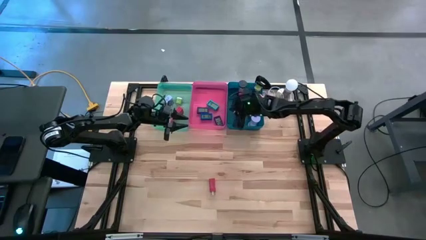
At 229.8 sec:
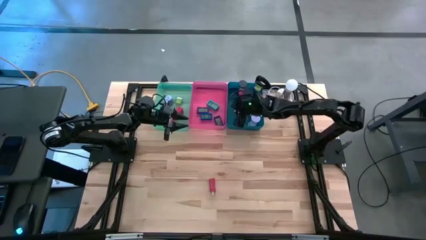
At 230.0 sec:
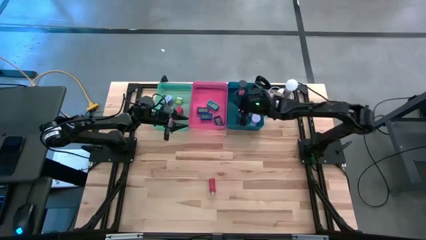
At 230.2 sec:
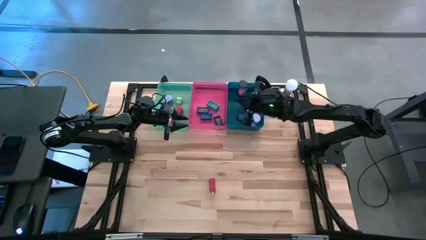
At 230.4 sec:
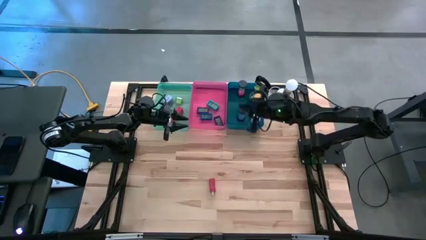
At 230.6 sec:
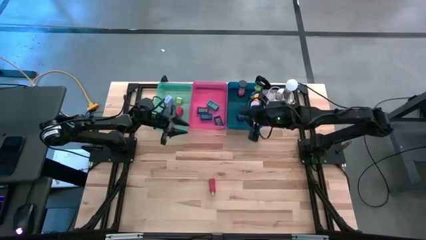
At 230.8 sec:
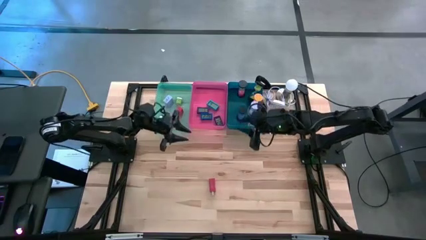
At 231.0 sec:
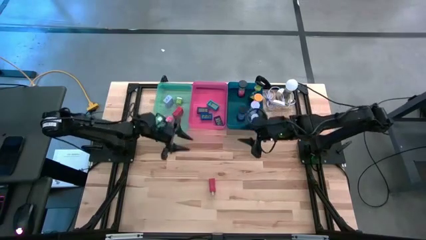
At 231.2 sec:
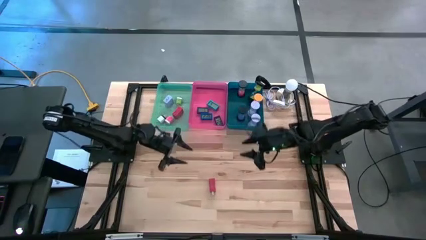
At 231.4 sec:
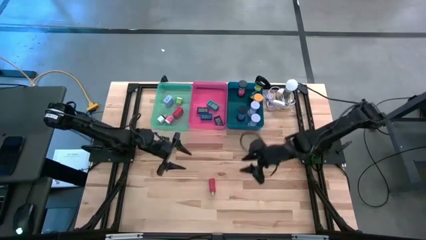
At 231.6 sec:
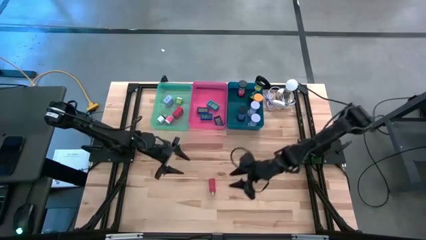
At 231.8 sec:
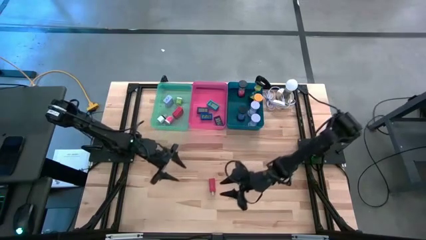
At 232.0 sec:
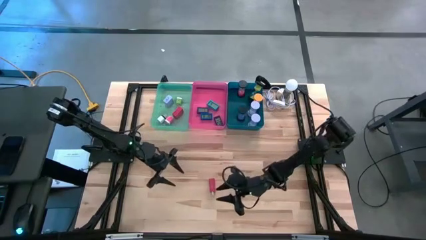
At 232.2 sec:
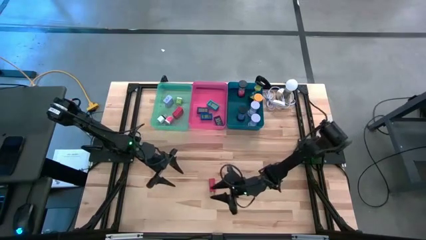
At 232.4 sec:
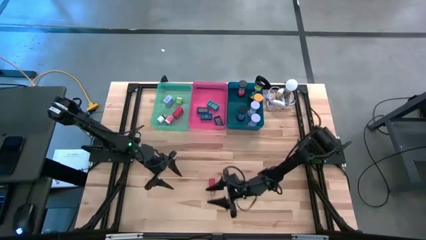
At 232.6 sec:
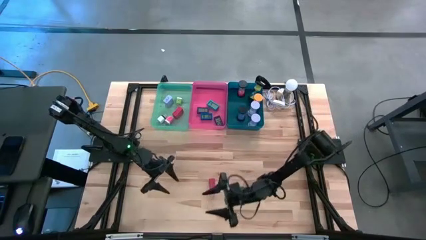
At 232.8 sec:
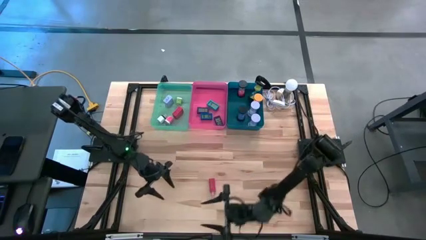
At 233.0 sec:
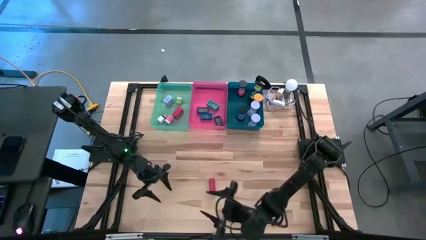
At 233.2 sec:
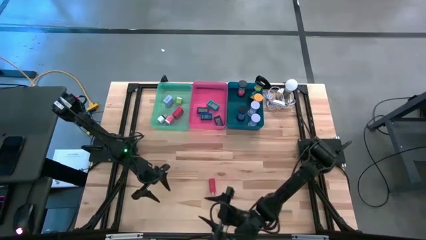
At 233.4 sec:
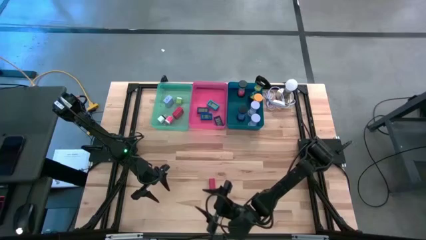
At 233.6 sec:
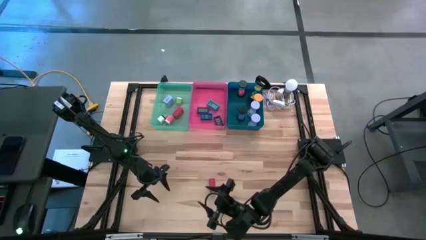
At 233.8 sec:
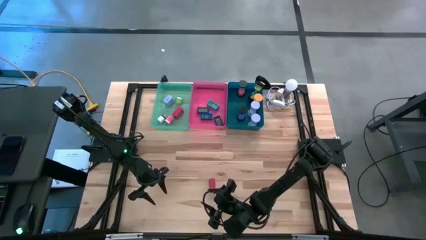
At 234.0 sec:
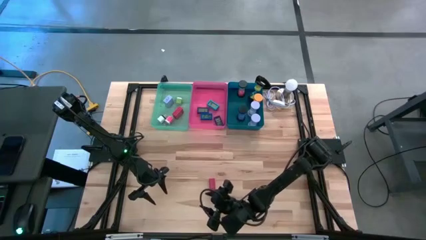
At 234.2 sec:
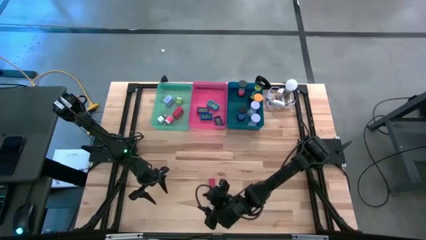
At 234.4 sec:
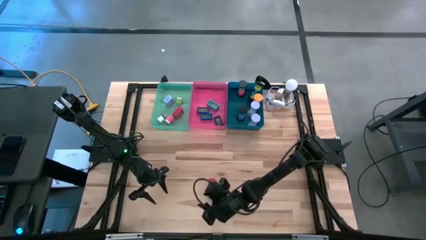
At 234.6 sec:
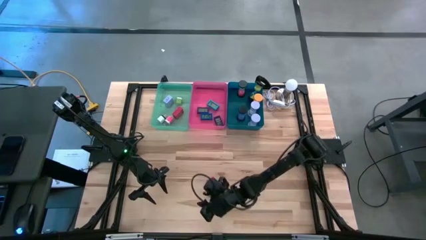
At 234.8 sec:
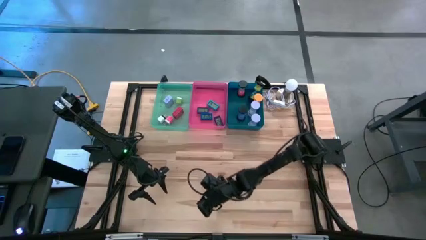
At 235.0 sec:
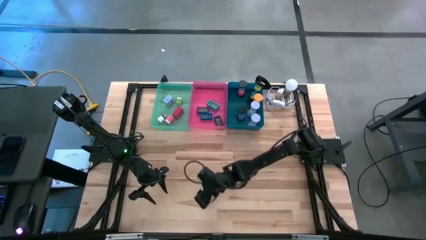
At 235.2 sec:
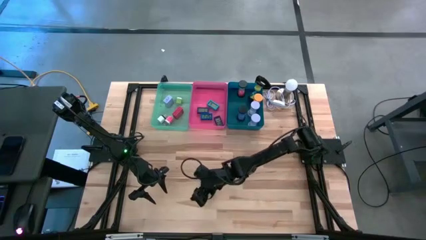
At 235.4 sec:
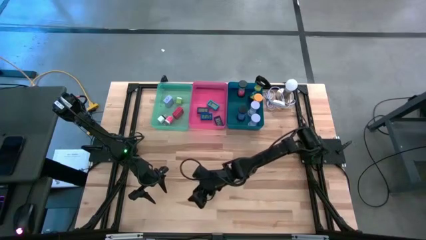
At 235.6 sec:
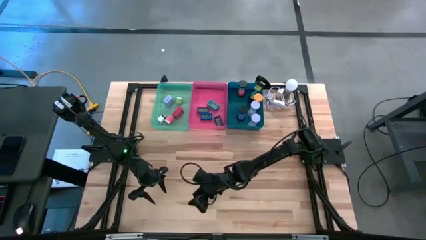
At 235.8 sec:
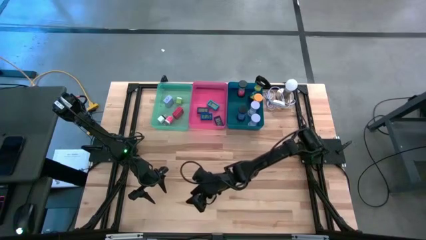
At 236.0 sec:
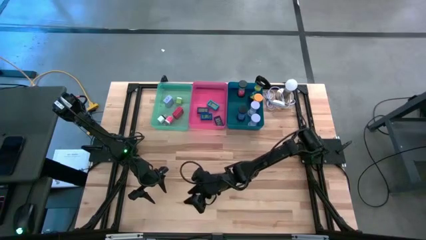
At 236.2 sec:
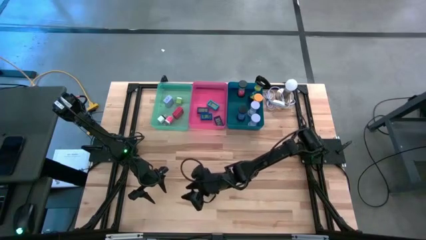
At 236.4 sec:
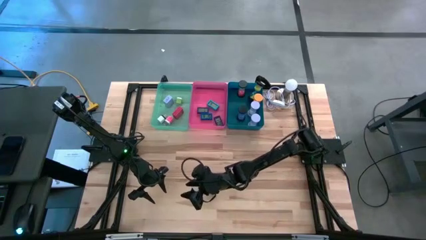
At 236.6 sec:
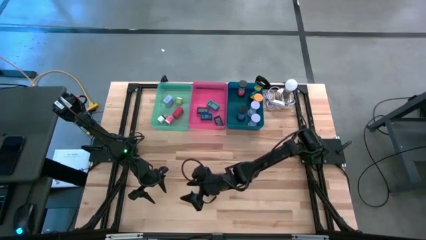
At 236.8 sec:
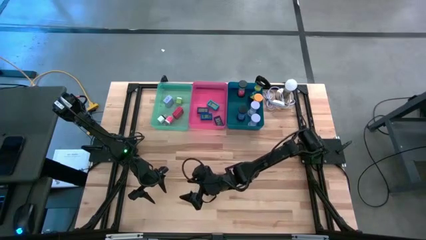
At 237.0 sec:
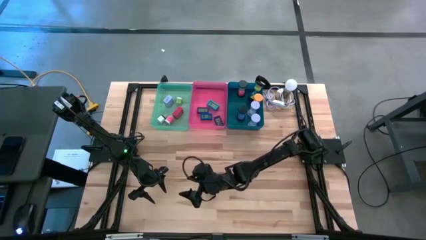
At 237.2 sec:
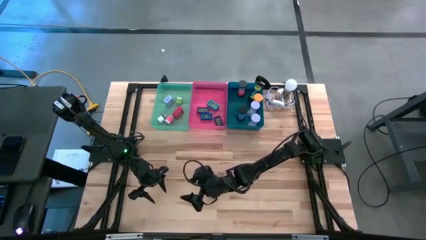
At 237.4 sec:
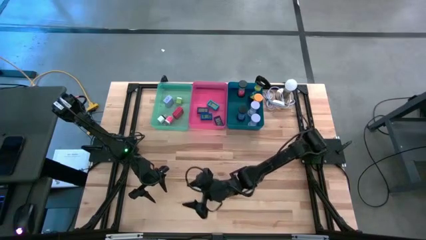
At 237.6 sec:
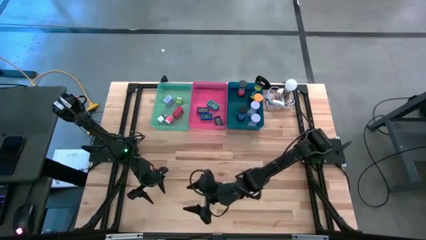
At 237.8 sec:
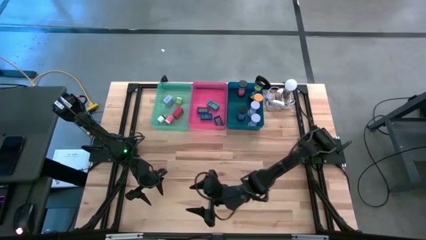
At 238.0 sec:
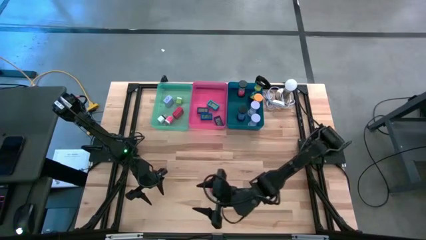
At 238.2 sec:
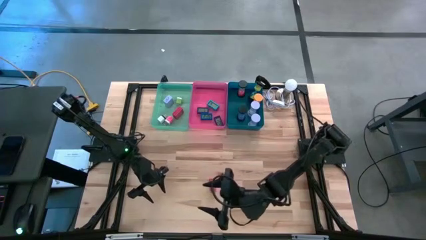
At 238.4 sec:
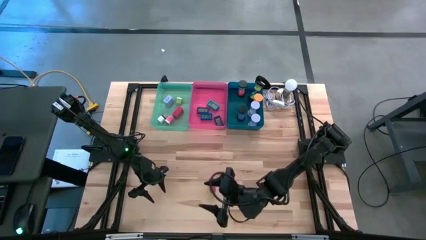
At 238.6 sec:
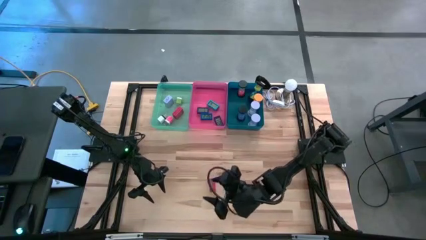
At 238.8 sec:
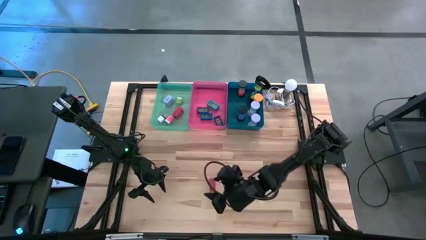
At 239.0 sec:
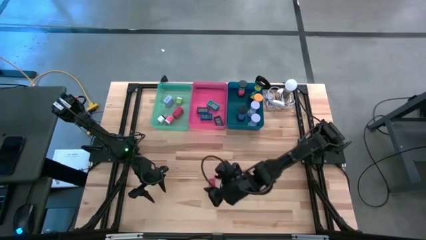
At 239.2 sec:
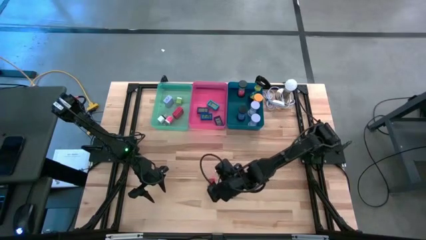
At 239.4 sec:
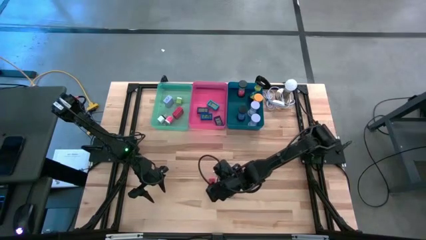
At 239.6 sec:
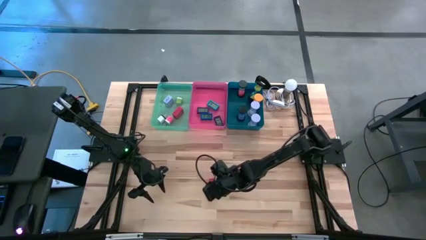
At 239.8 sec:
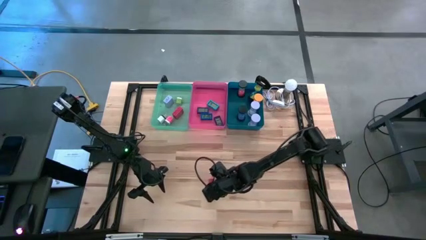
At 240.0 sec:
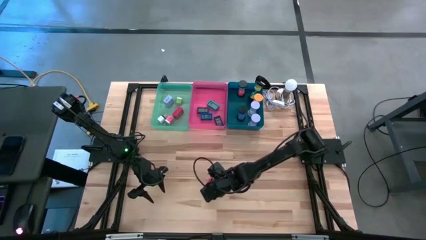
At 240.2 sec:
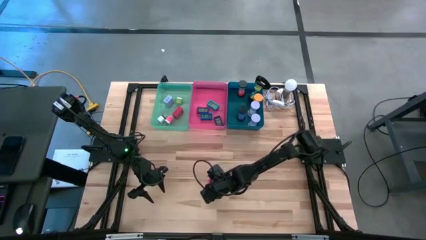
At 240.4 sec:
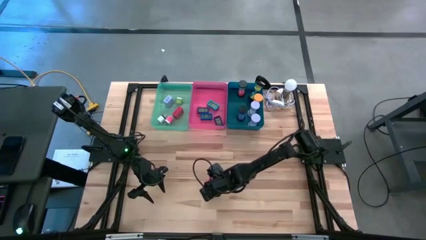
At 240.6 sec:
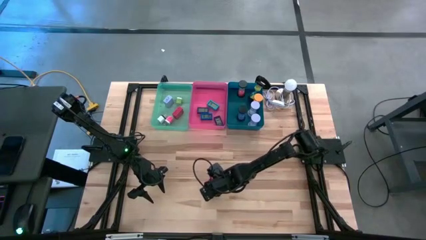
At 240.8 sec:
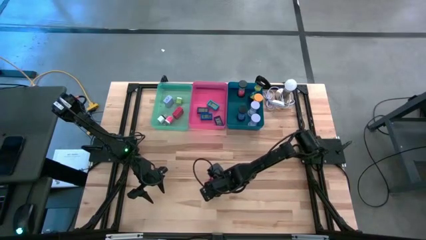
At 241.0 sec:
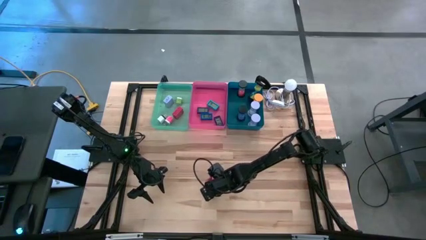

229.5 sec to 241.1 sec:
Task: Pick & Place Office items
Put the red adapter into the green bin

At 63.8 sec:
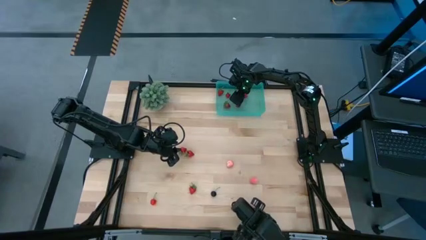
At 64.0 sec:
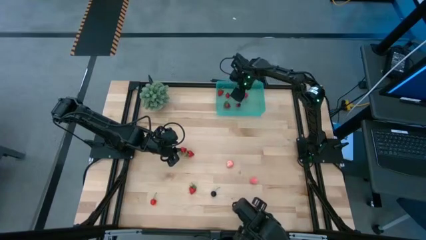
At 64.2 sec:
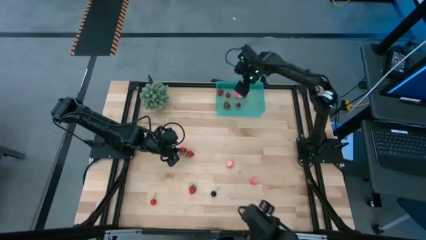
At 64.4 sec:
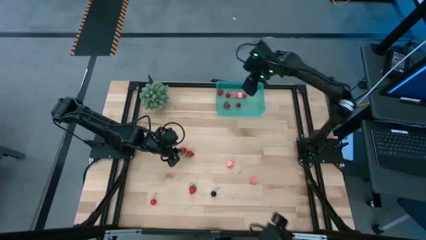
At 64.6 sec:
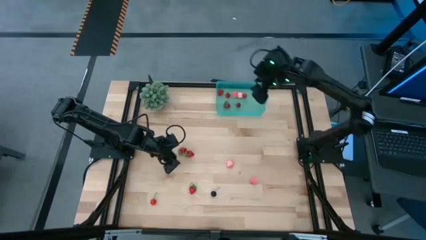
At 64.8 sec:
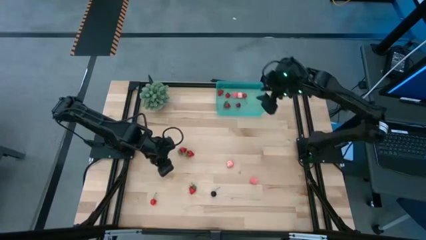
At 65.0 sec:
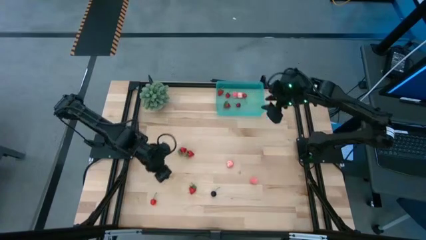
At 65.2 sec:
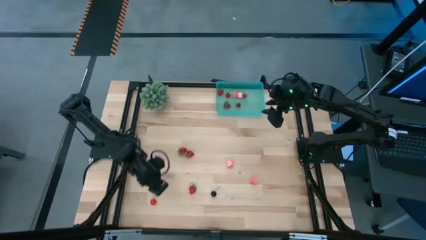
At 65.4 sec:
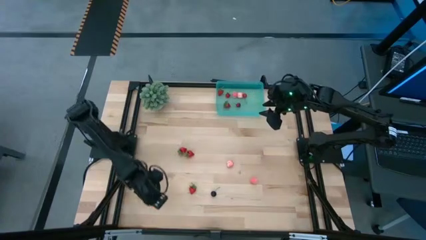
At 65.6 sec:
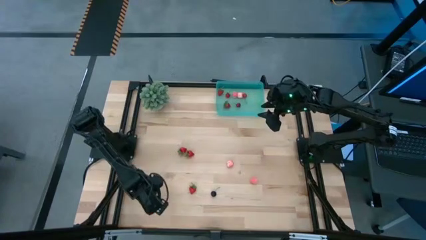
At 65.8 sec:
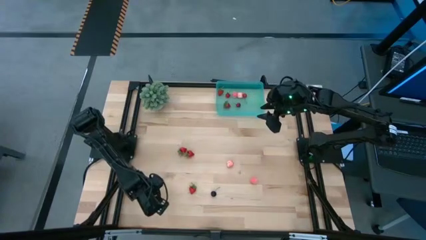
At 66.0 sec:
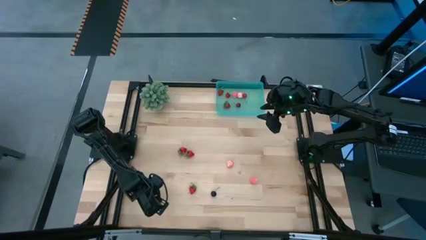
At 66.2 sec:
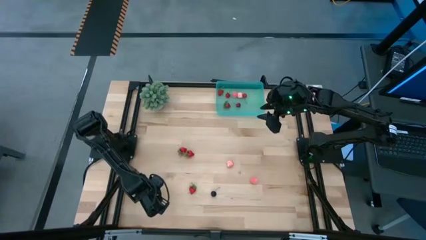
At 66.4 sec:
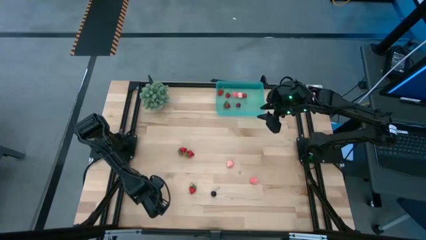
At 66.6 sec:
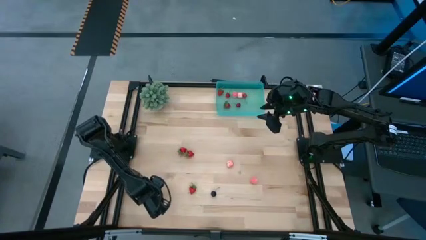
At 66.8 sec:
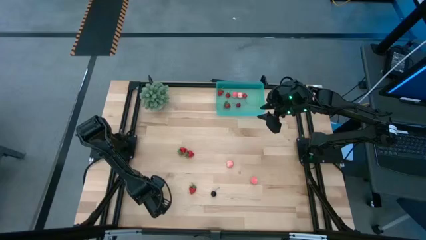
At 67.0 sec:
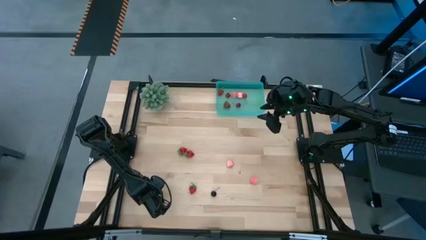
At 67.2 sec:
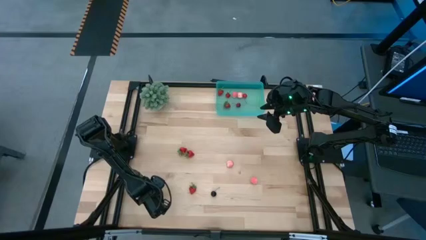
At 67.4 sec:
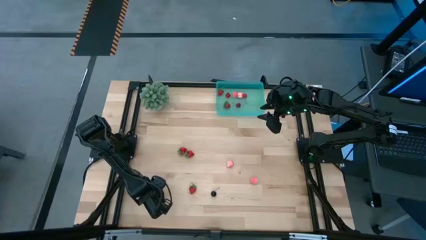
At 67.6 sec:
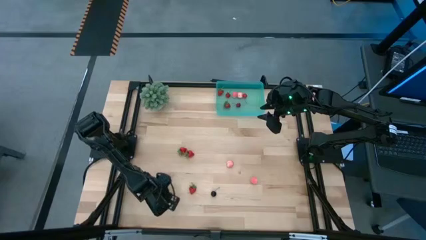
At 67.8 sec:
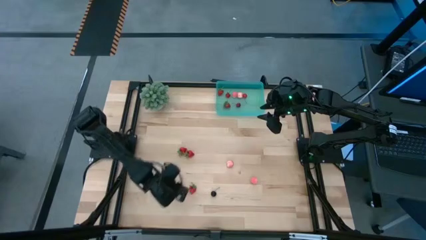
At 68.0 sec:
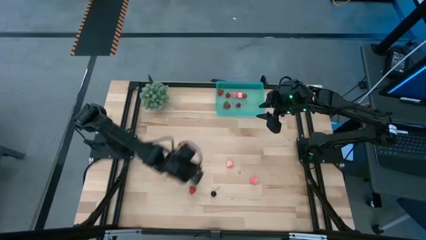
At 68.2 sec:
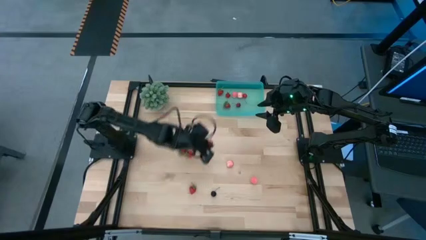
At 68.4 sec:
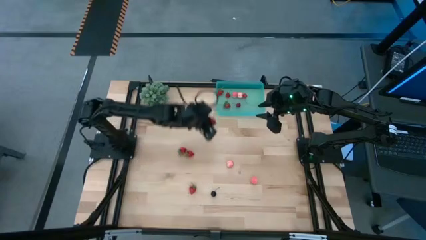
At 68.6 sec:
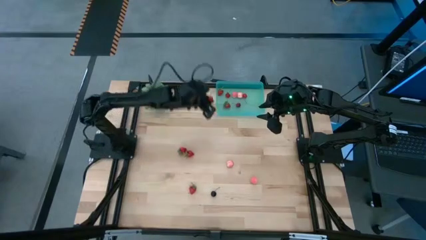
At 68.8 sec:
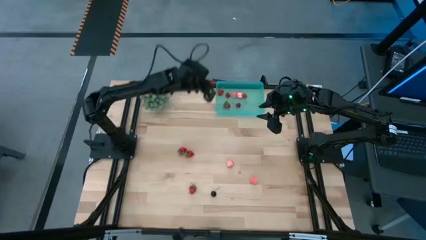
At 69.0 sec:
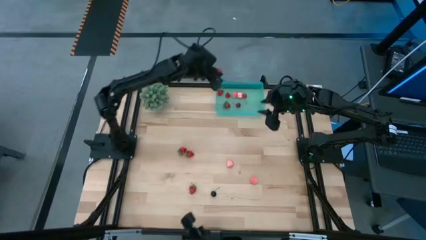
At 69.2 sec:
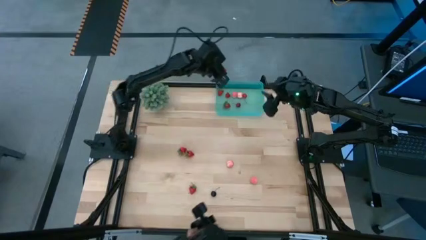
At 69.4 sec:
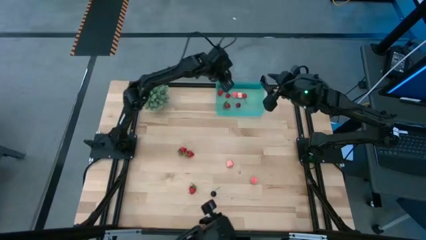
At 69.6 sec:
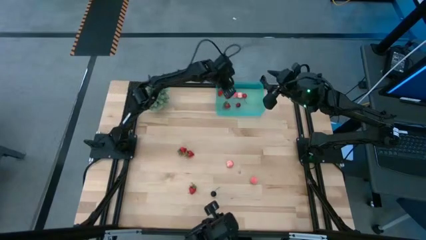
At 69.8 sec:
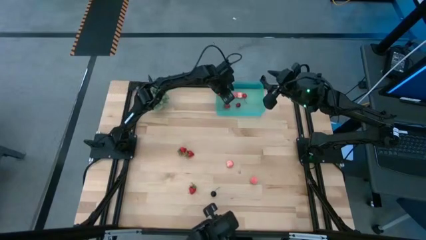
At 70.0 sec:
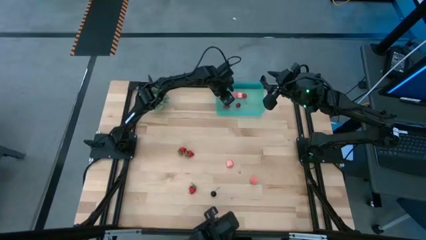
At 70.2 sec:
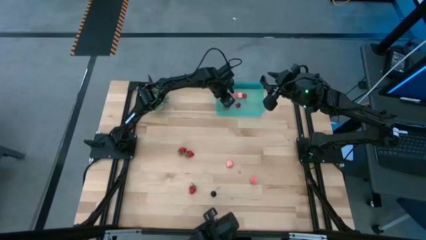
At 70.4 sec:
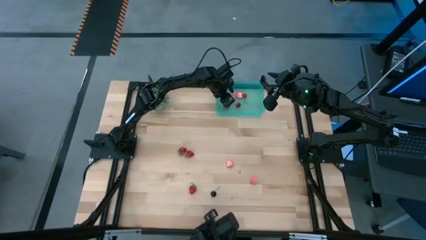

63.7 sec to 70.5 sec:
Task: Pick and placing Produce into tupperware
Put the cherry into the blue bin
